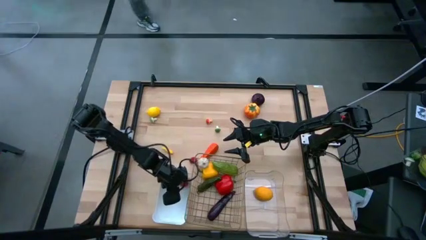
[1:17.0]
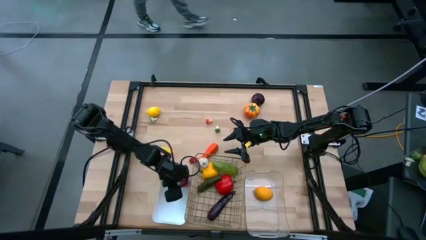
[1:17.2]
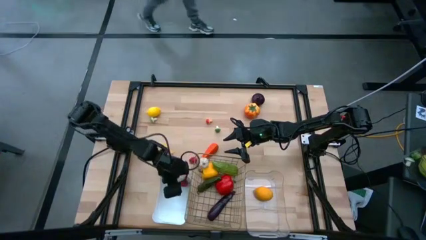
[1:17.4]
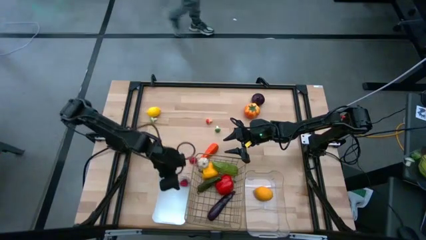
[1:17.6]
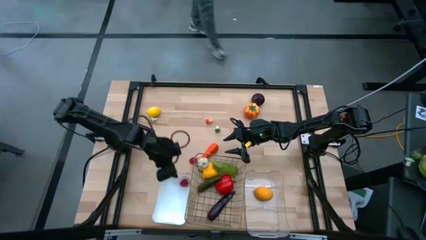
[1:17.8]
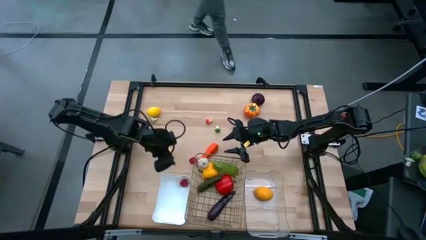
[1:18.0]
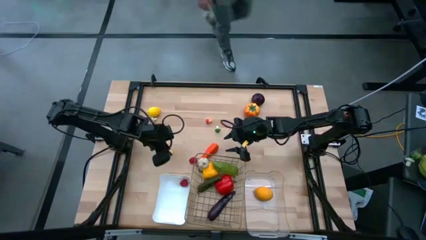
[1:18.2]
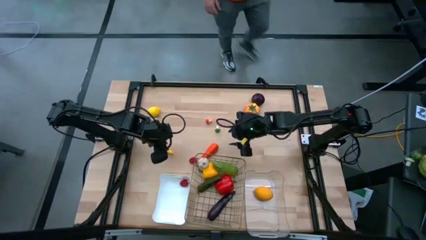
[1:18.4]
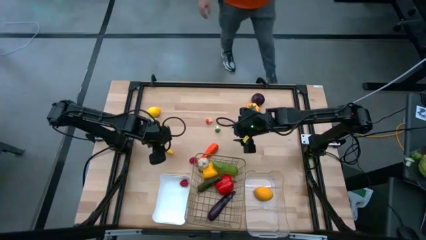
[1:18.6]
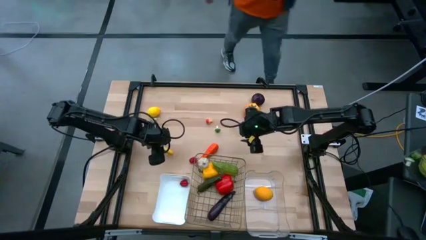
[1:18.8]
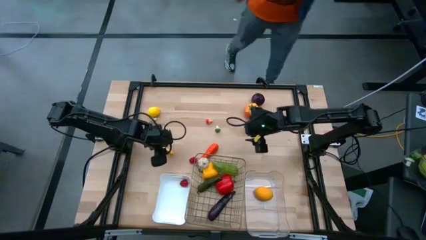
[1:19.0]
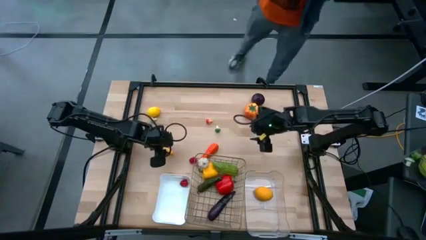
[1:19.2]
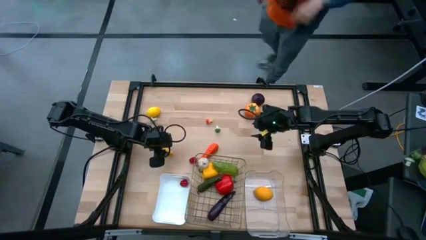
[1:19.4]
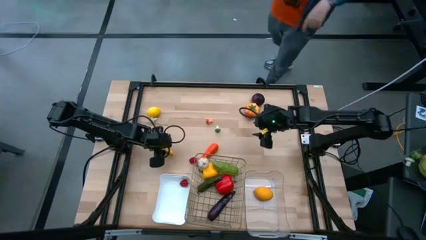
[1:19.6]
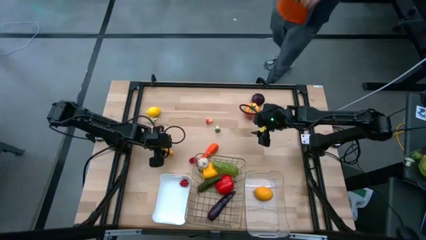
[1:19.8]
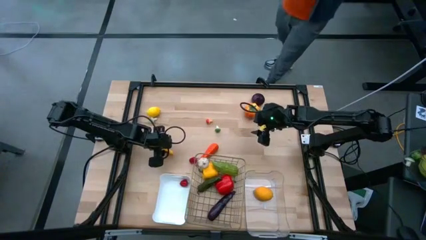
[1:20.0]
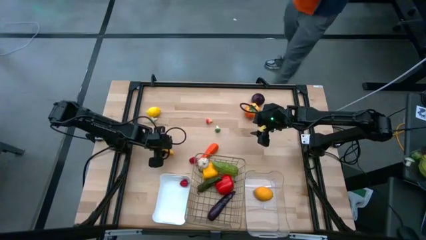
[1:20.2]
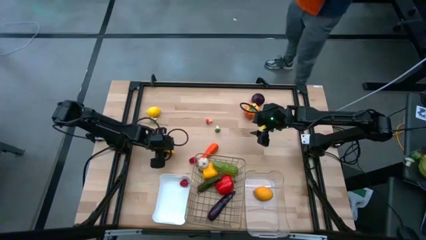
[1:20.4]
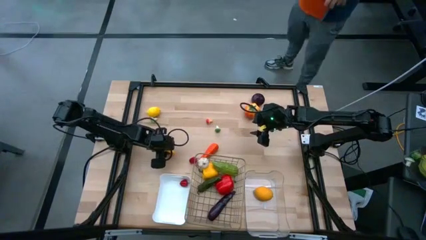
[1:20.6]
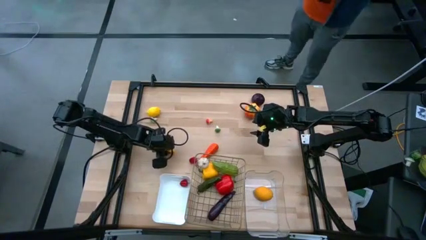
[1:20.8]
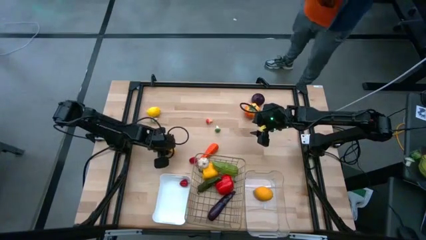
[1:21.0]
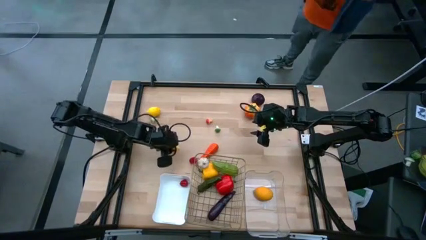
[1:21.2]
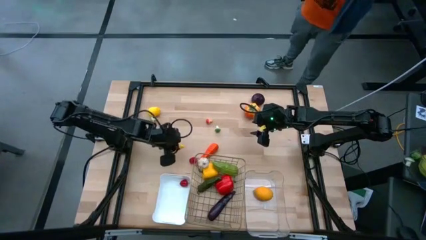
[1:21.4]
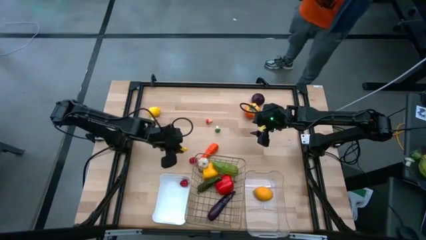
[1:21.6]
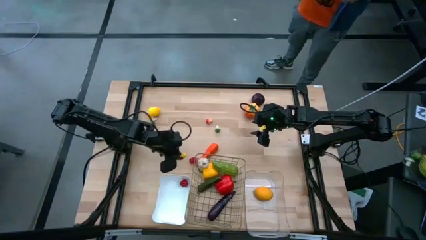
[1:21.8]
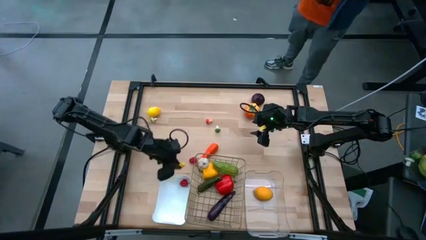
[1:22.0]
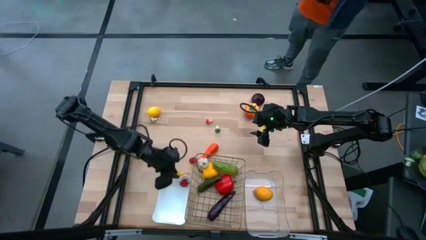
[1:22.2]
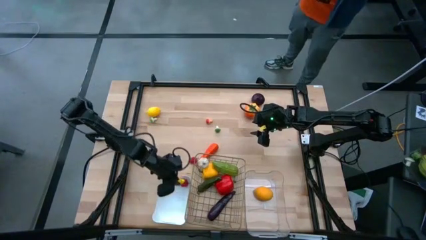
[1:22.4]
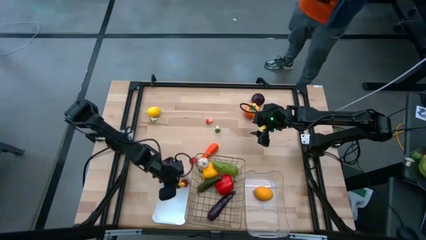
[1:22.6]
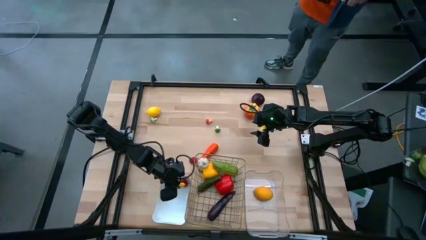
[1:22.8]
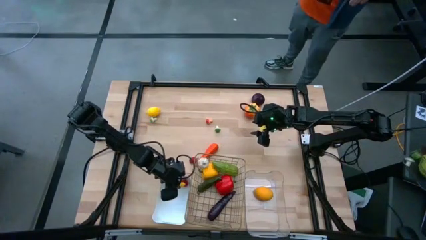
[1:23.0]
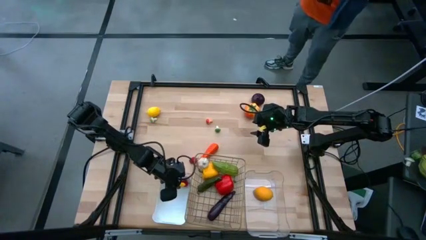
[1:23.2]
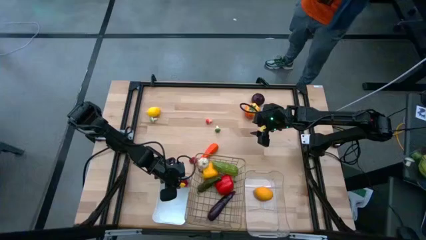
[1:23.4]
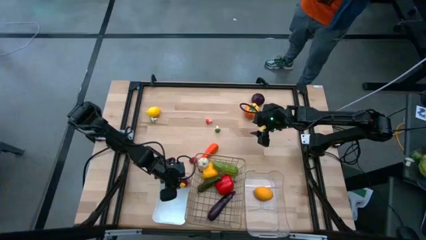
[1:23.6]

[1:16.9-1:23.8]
Task: Sort produce into baskets
Put the yellow corn into the white bin

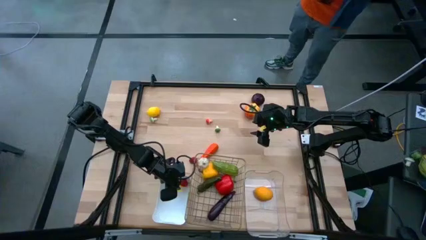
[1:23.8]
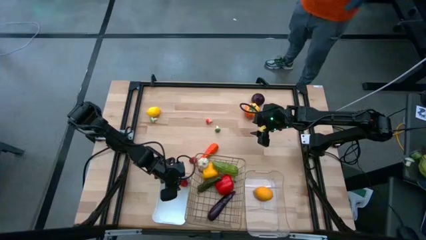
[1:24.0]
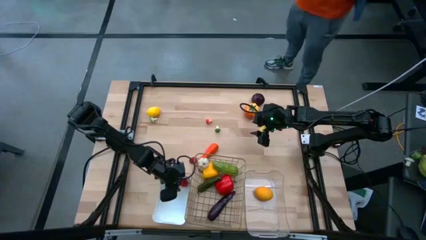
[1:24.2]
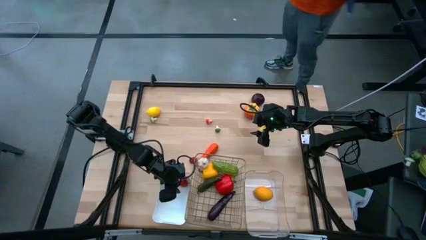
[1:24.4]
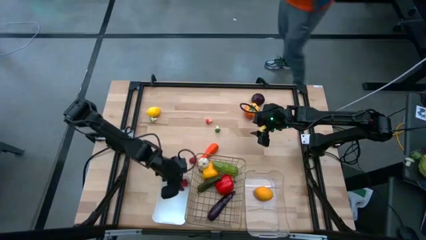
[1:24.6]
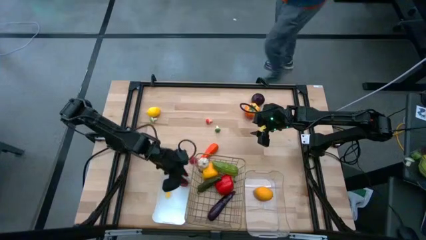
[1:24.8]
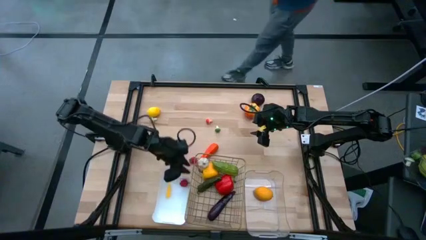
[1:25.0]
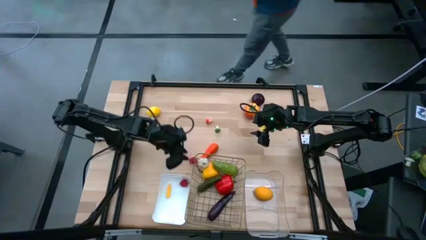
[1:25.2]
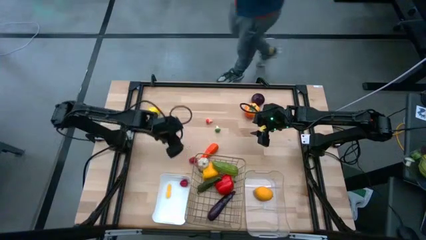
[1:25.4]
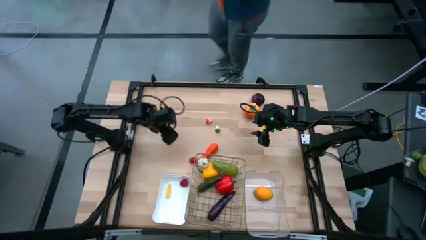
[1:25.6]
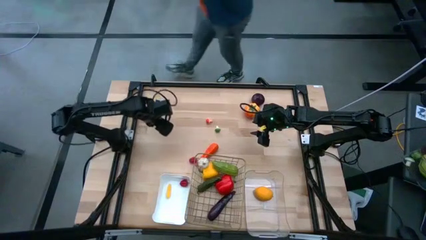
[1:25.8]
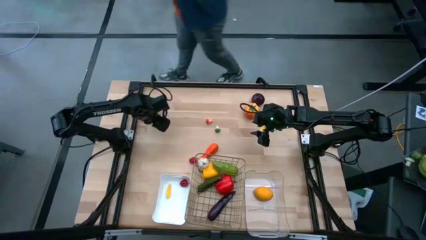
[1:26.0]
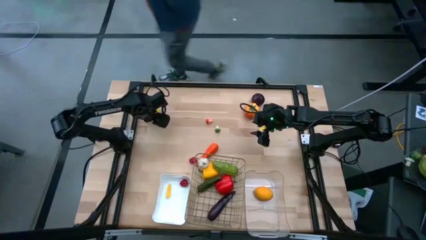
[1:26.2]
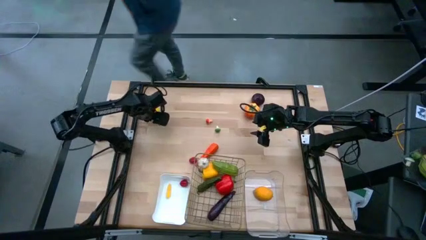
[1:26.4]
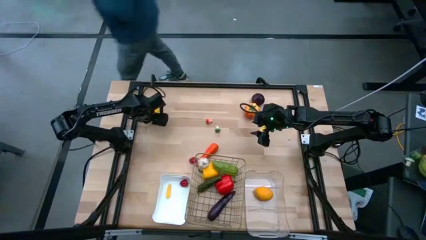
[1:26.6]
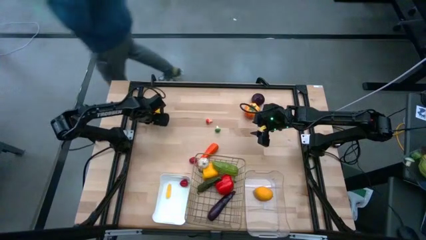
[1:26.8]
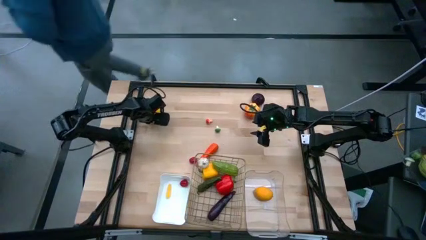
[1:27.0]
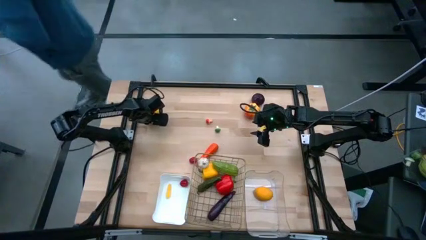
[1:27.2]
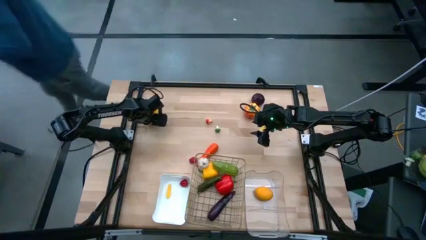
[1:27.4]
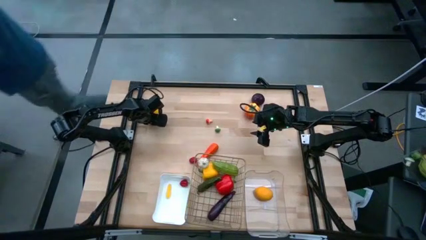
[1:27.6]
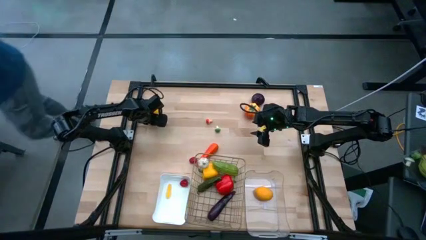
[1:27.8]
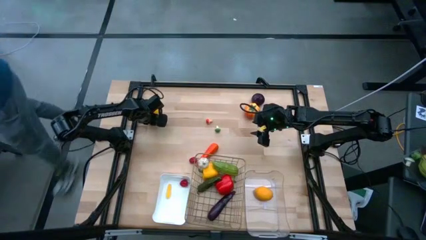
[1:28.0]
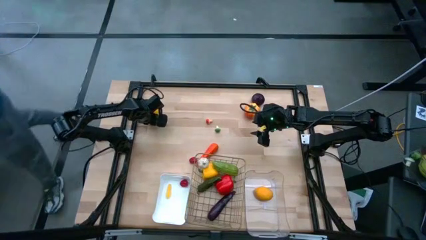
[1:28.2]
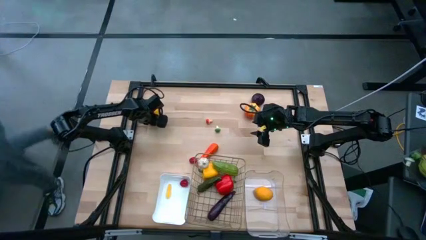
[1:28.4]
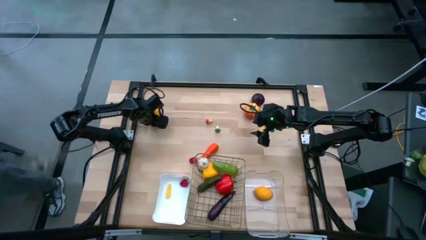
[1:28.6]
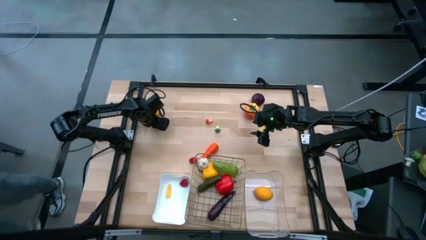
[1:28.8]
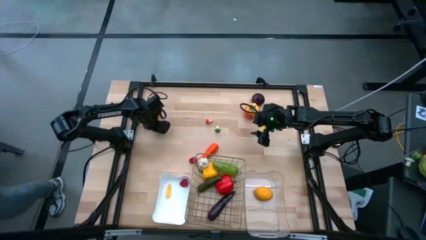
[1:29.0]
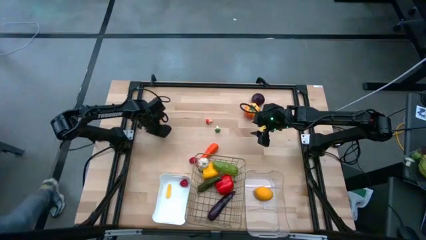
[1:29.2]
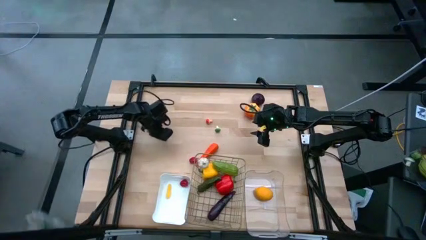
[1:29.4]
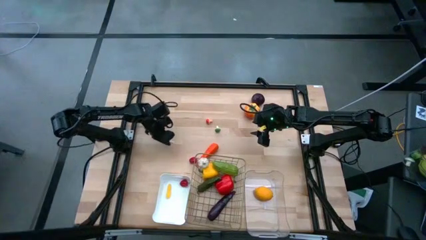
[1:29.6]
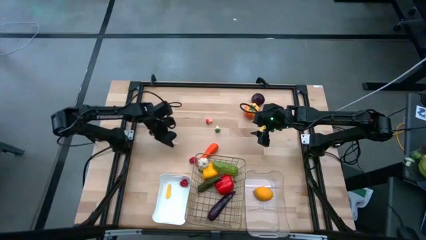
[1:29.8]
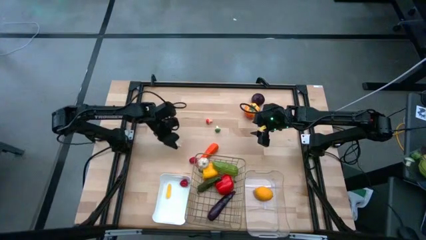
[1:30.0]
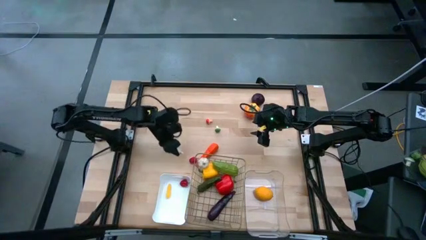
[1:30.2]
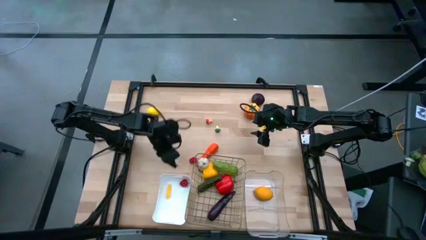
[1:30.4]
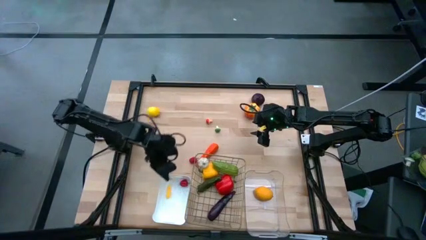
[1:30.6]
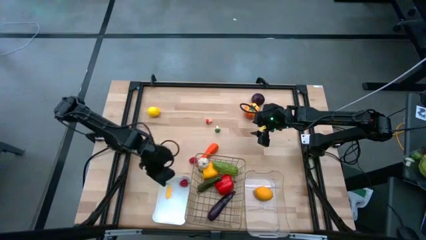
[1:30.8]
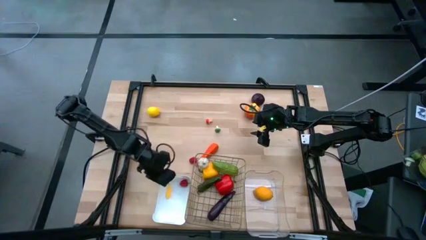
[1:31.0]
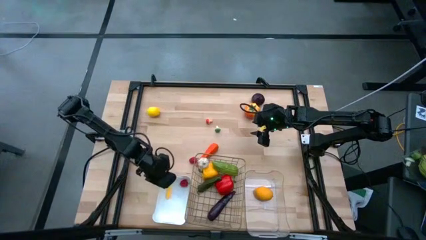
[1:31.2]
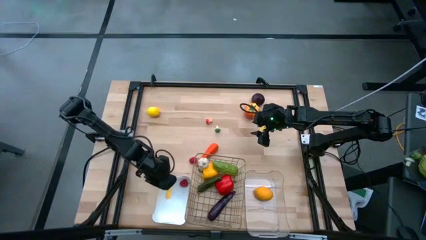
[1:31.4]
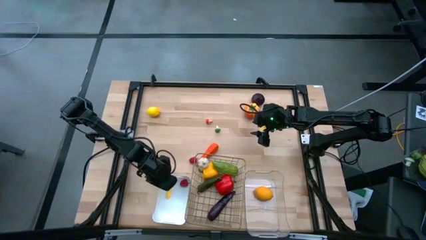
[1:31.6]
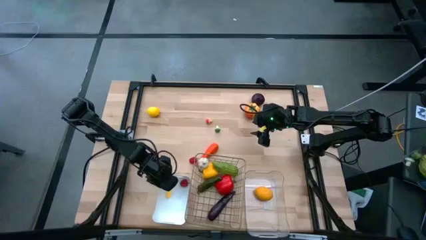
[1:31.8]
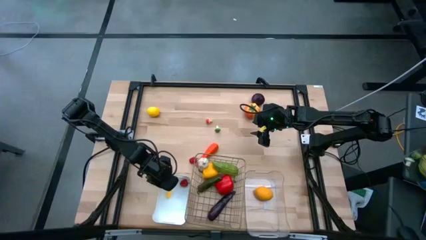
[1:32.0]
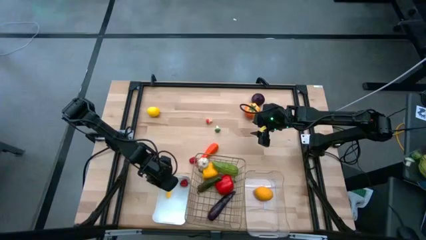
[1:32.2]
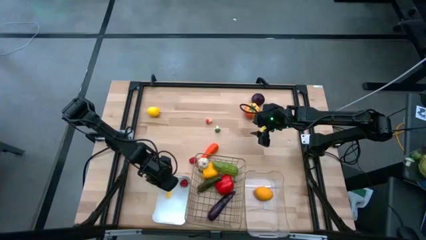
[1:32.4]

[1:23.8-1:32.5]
Put the left green mushroom into the white bin
